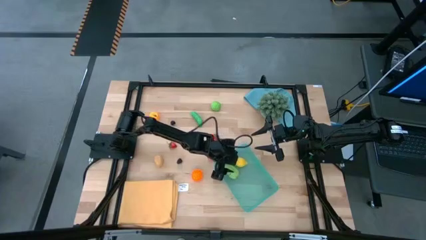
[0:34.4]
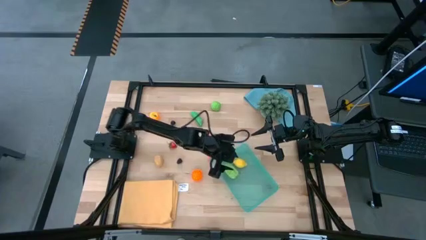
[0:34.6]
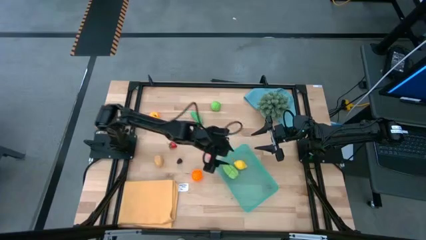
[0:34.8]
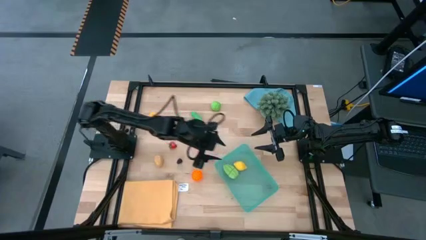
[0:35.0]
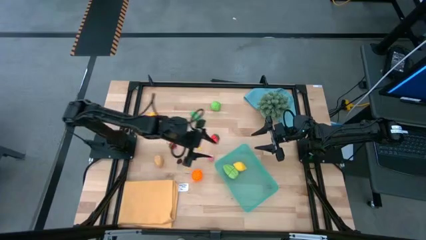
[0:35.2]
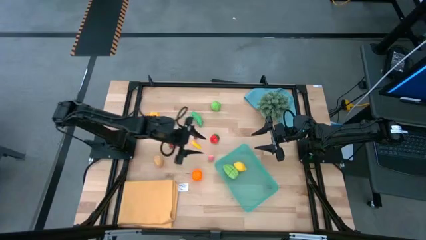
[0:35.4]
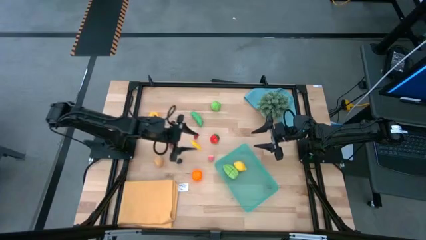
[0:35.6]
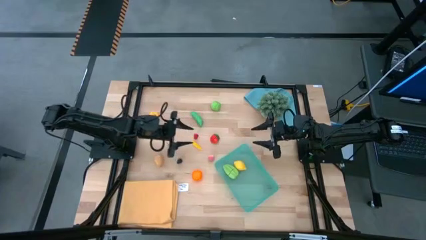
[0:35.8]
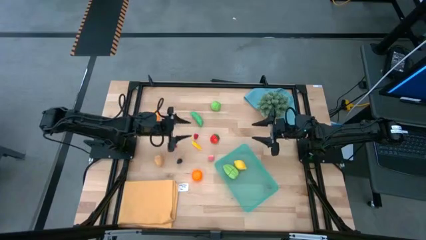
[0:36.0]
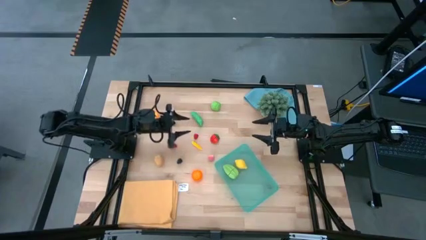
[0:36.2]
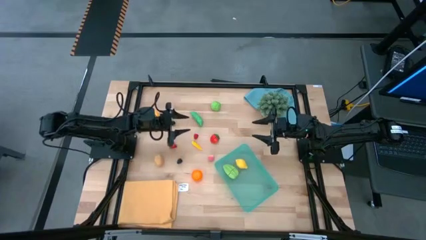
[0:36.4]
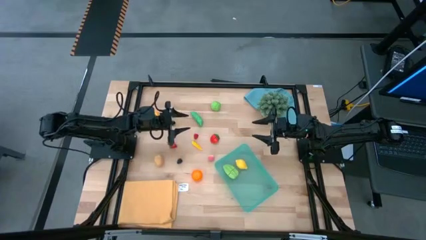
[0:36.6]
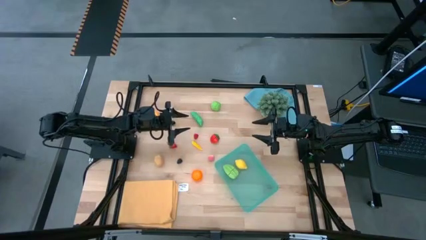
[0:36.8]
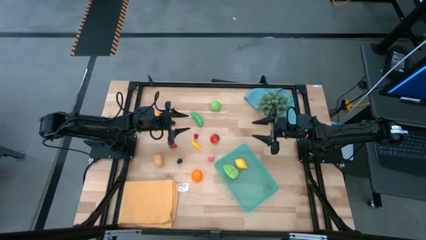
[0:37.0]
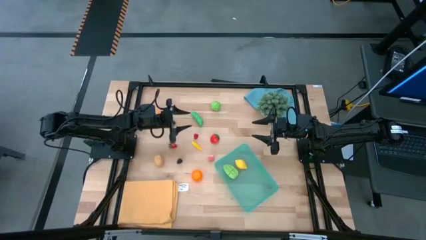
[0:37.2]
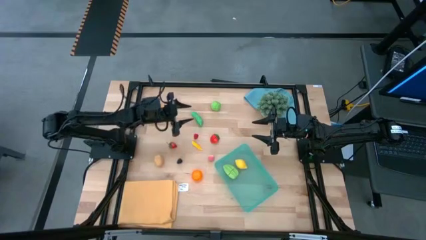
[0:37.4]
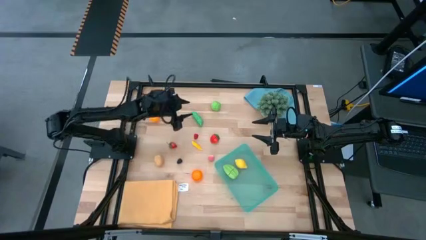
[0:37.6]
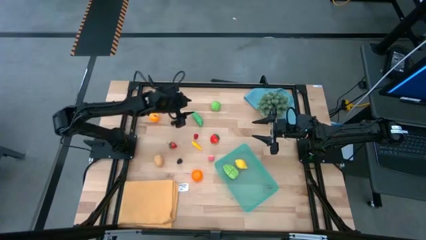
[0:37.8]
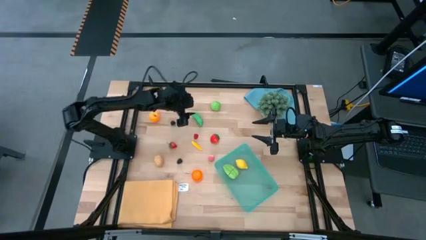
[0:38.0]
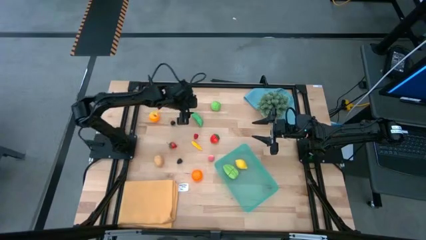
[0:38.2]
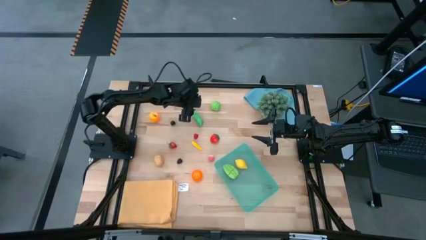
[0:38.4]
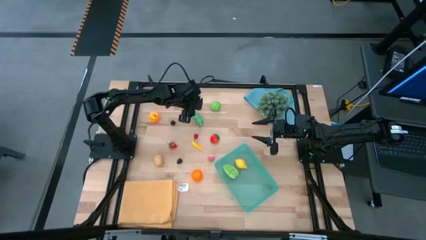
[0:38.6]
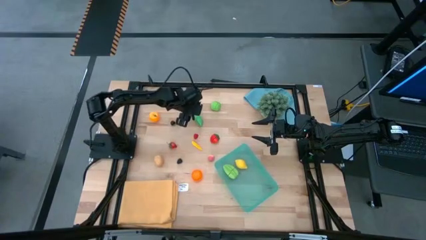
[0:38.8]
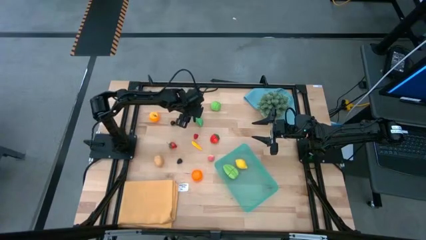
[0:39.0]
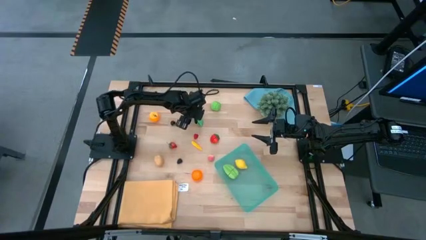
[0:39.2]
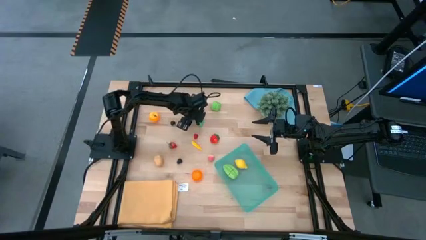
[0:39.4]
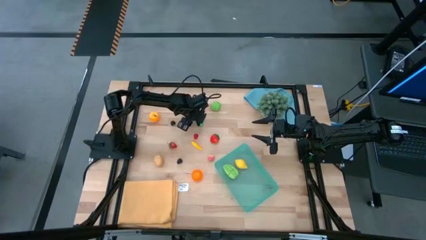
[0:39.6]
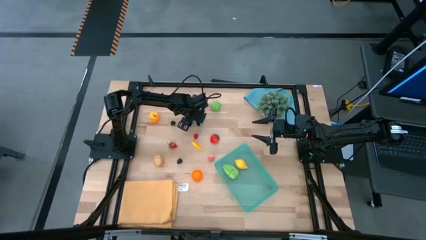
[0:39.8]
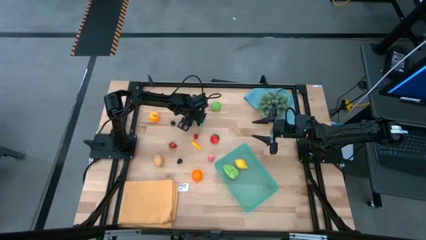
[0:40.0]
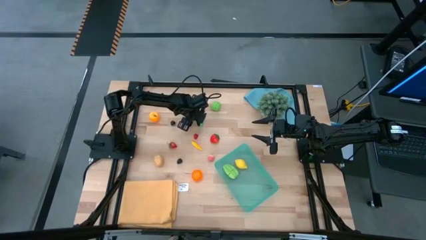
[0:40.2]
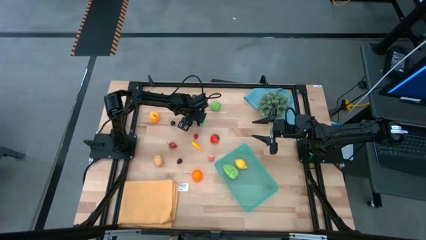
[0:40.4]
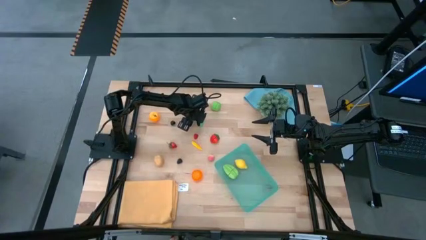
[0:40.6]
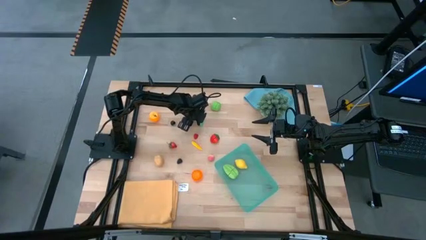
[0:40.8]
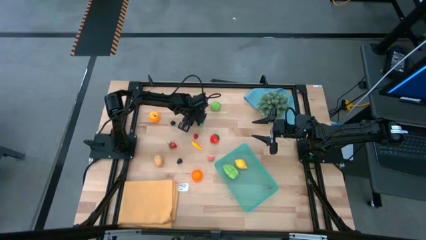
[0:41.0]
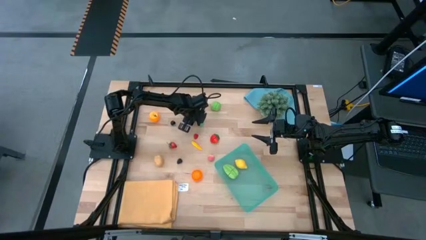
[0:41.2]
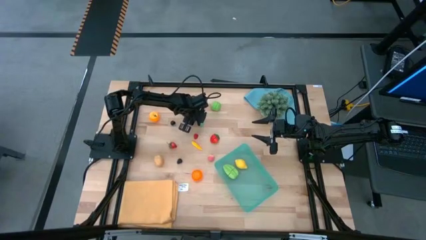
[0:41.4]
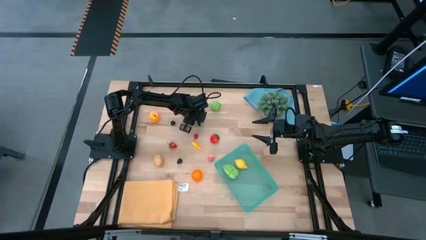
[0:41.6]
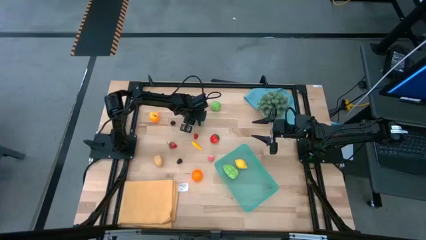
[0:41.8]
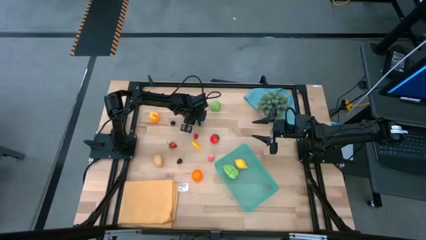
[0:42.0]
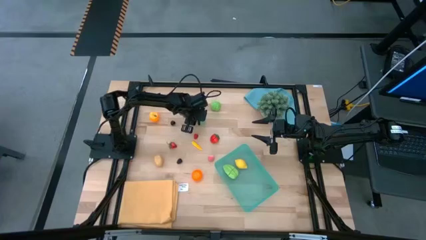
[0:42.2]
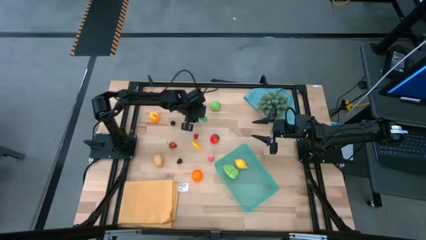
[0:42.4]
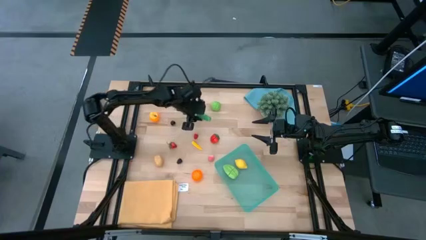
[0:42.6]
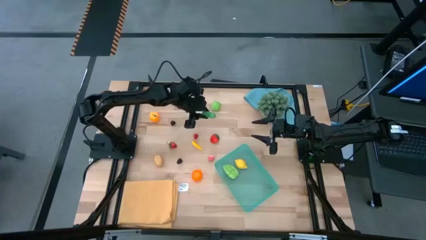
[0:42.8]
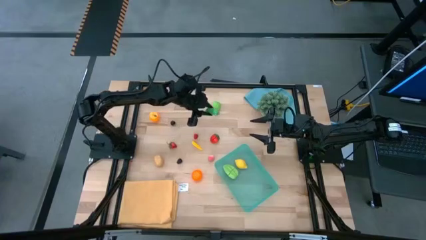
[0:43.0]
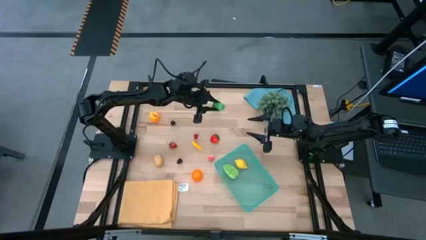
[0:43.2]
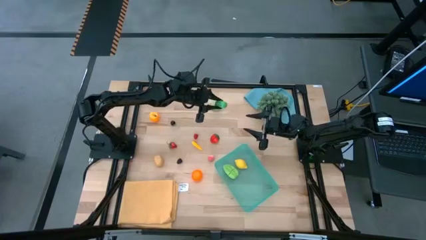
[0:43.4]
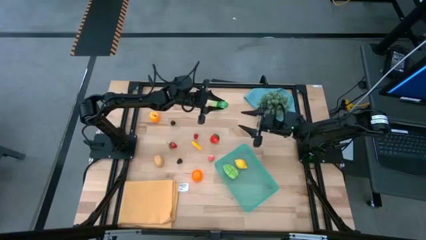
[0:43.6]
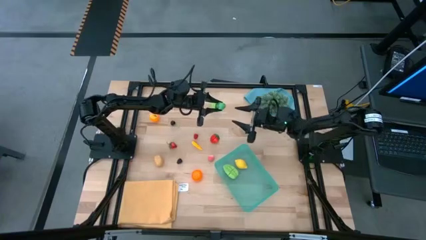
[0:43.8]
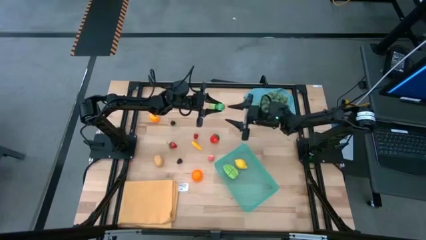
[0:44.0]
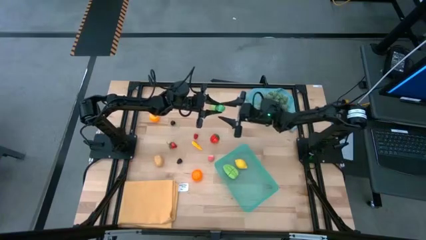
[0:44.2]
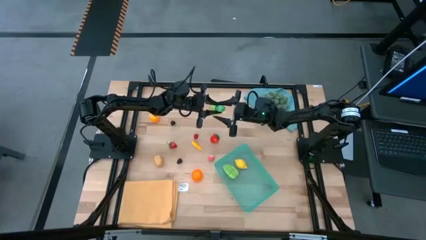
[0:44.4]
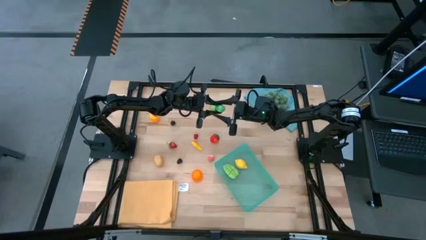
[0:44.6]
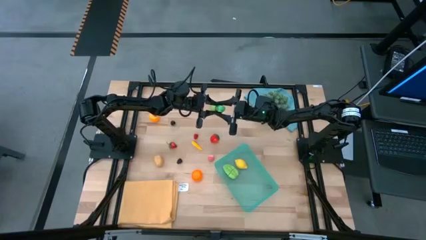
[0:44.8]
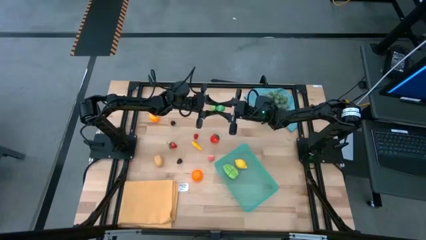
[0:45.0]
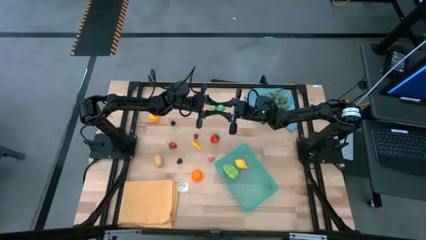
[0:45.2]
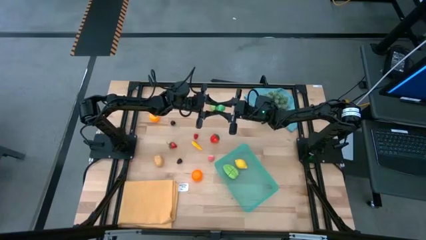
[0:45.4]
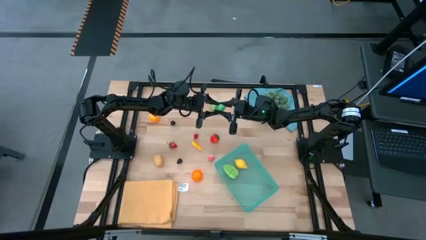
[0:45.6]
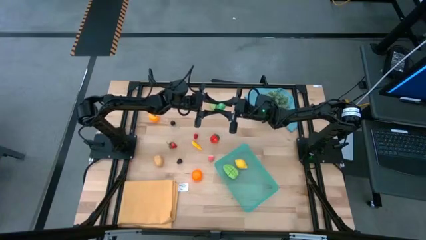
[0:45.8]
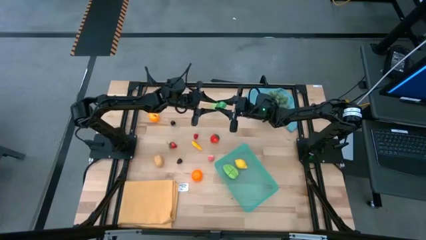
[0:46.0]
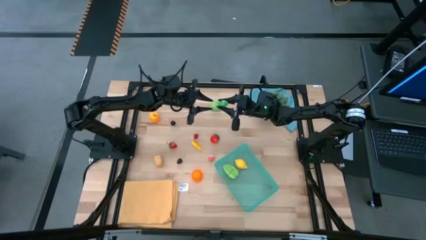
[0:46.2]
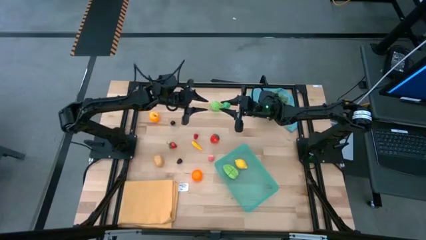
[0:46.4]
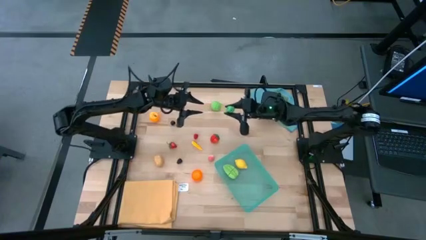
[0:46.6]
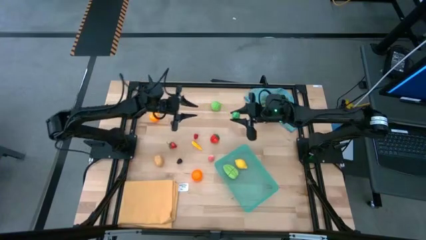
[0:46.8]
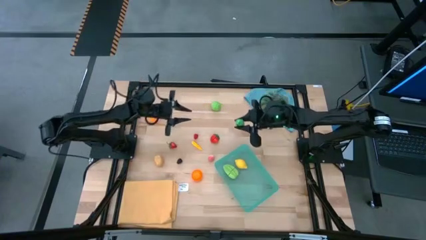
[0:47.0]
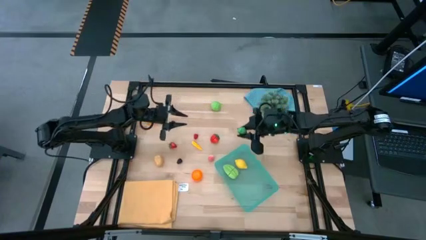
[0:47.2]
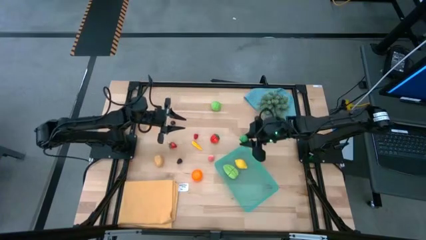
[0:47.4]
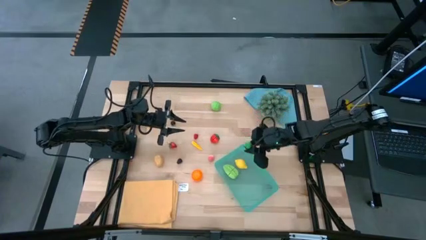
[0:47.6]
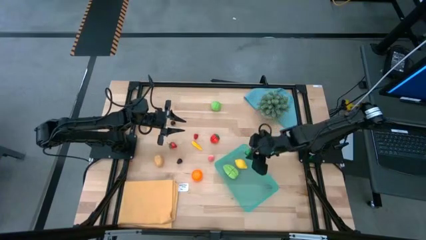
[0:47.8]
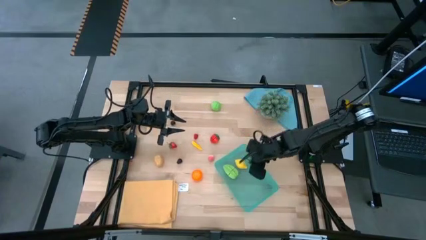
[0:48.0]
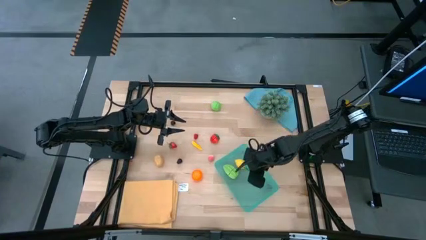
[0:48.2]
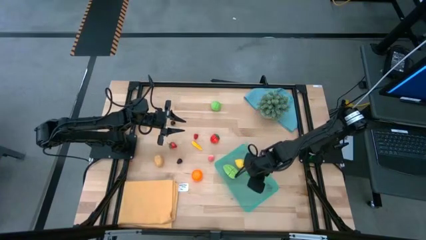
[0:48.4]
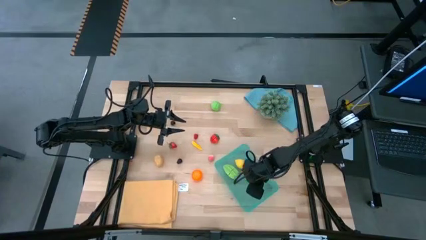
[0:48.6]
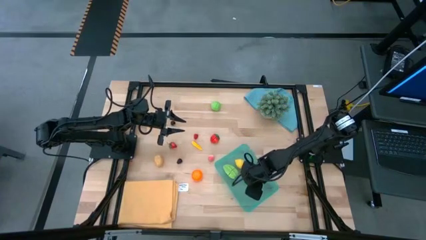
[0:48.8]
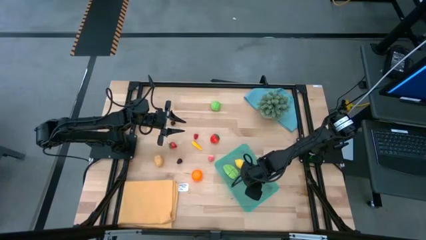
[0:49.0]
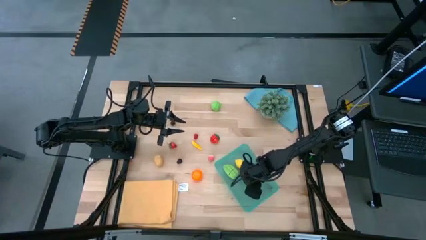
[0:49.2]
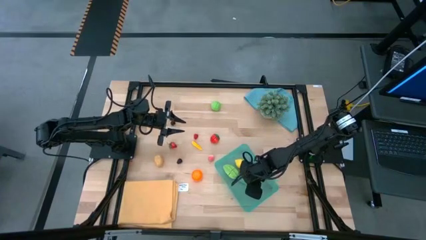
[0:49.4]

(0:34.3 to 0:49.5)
Task: Pick and placing Produce into tupperware
Put the pea into the green bin

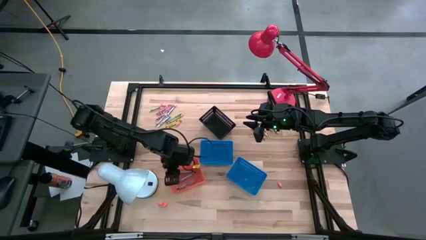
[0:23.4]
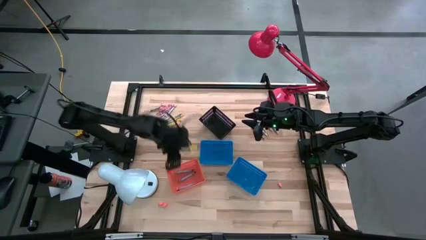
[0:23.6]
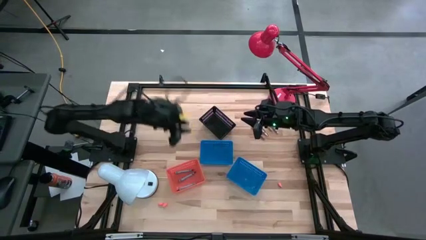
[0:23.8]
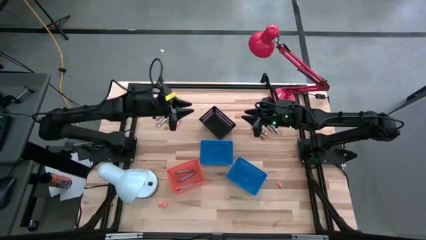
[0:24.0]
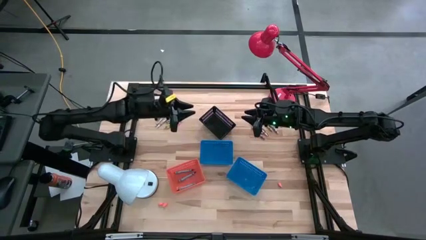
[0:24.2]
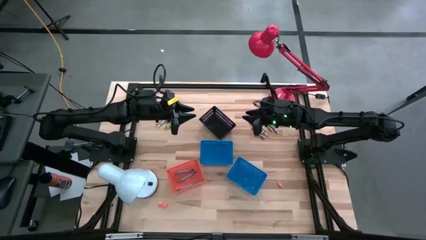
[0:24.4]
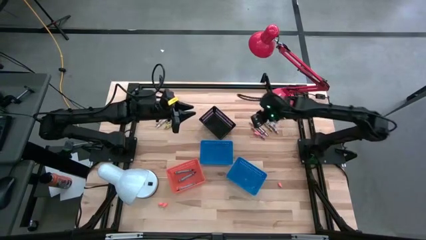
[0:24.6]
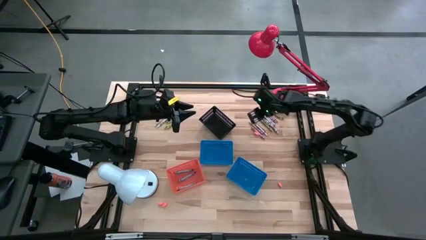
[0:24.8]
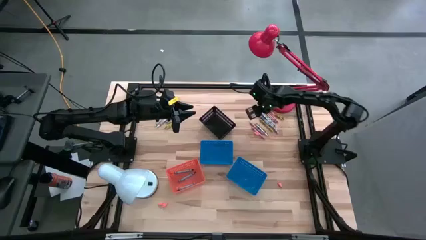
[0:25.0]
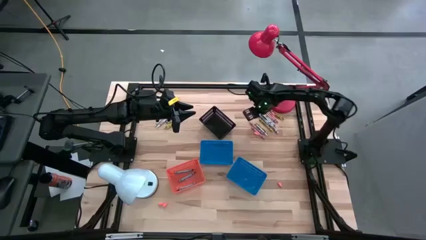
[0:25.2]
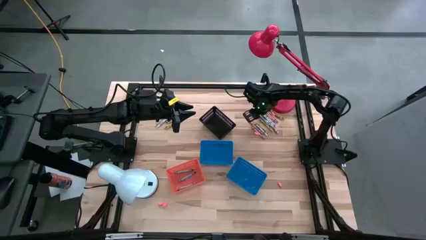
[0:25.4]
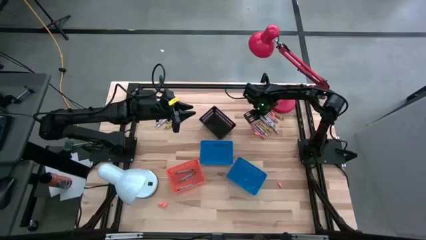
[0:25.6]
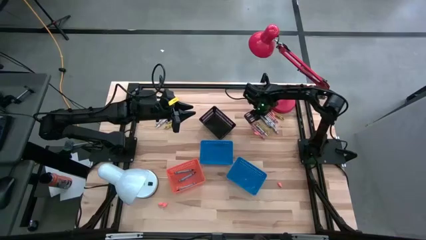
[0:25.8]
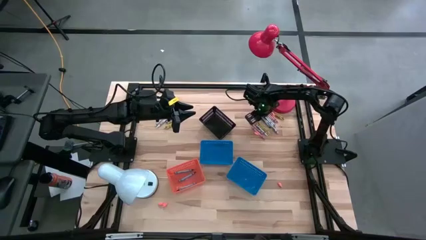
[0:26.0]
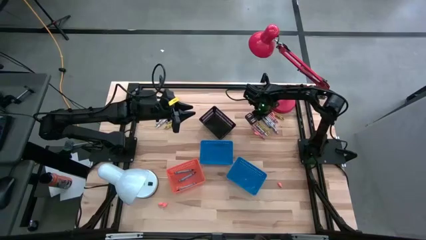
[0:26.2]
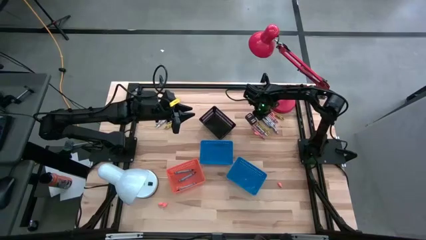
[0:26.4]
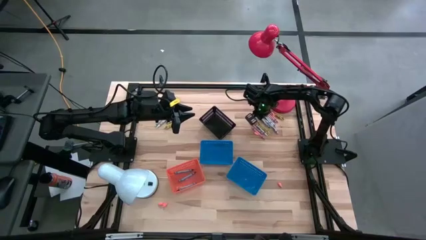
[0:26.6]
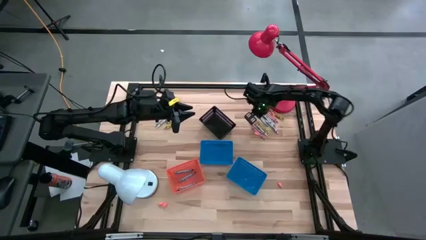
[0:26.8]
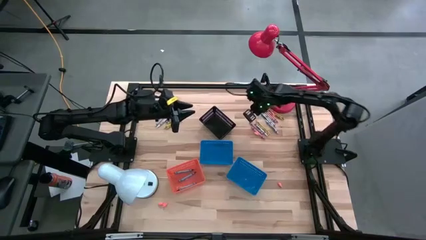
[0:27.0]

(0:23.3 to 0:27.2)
Task: Sort crayons
Put the blue/green crayon into the orange bin
